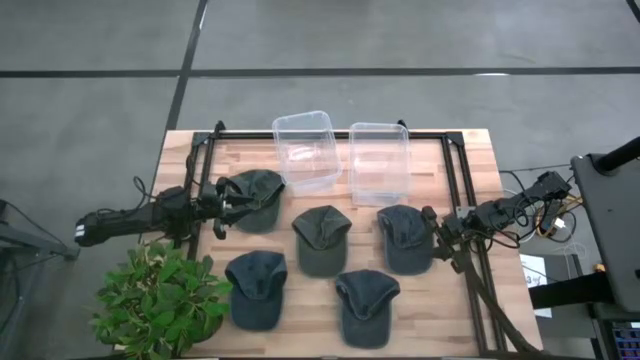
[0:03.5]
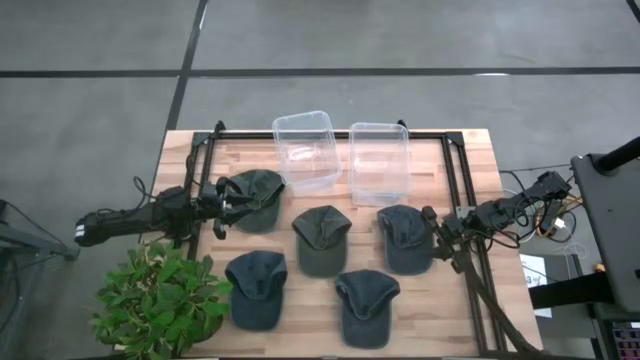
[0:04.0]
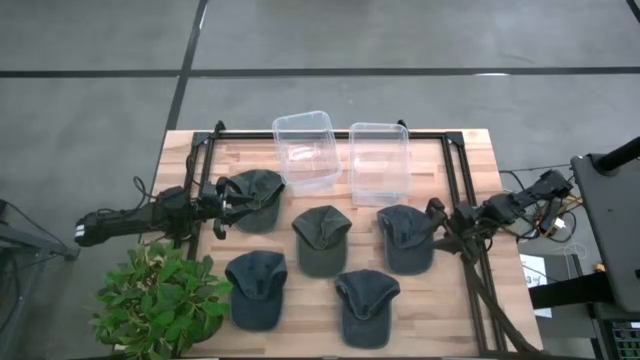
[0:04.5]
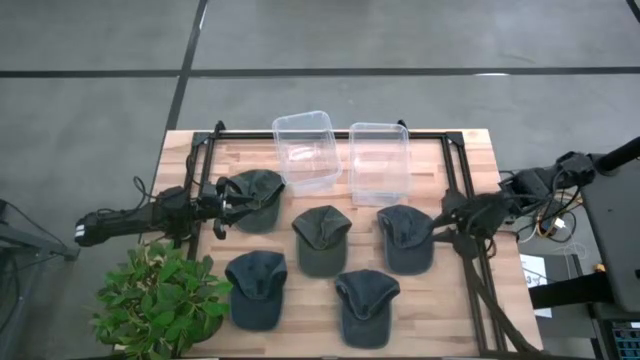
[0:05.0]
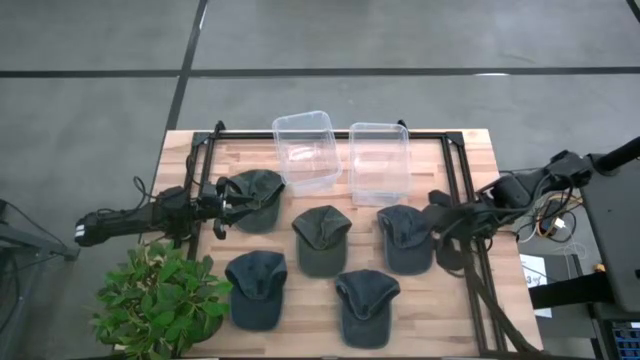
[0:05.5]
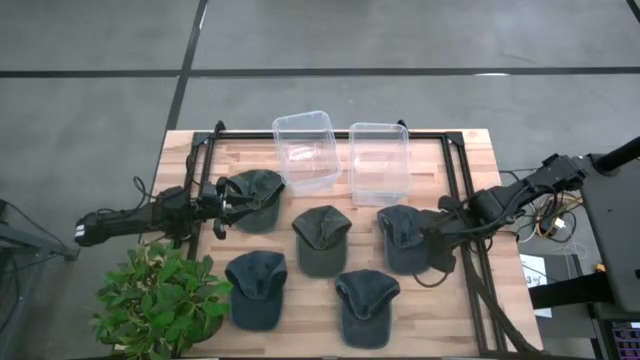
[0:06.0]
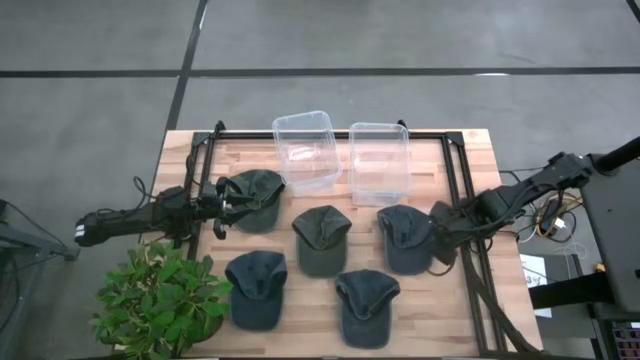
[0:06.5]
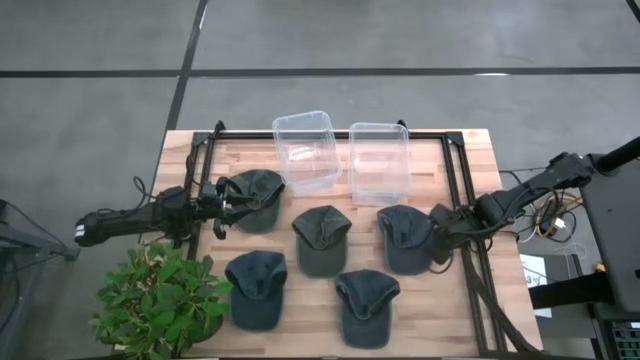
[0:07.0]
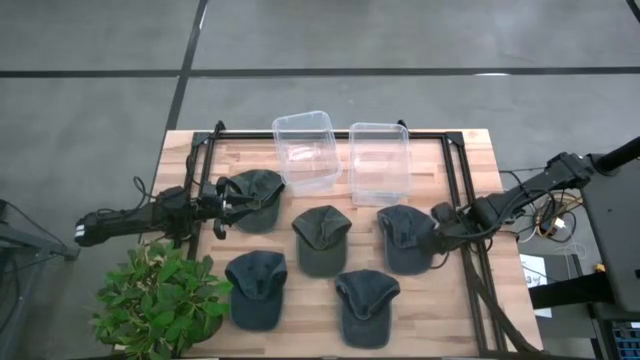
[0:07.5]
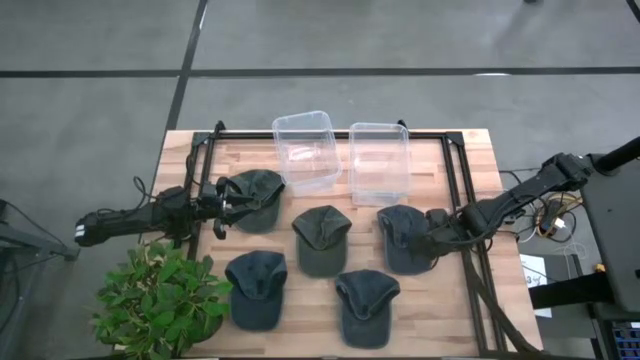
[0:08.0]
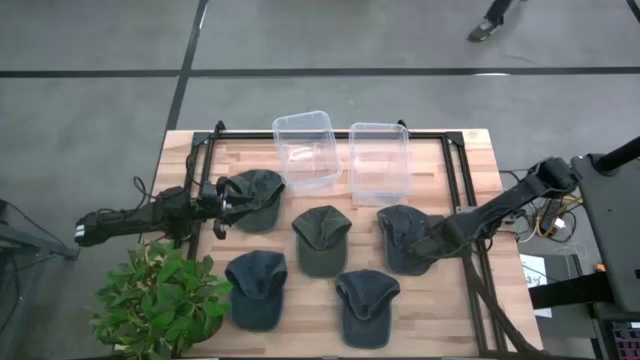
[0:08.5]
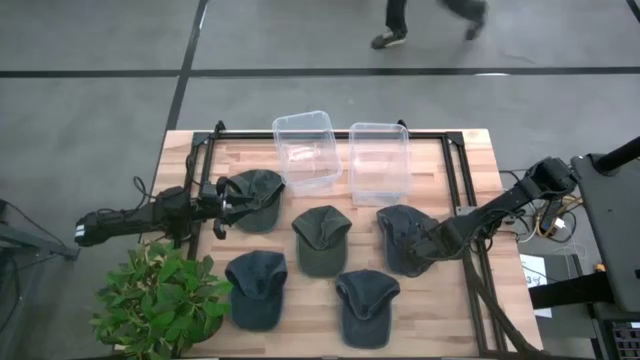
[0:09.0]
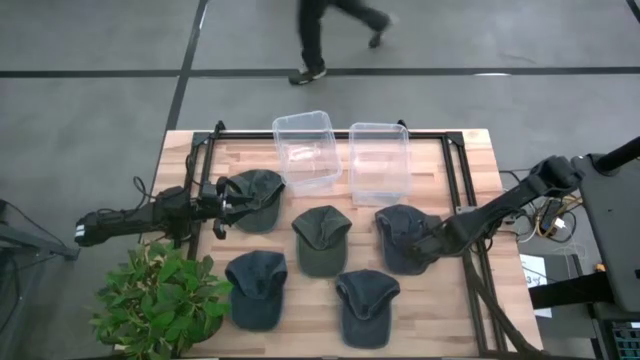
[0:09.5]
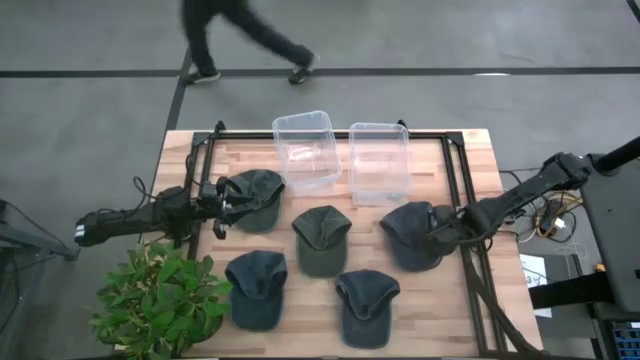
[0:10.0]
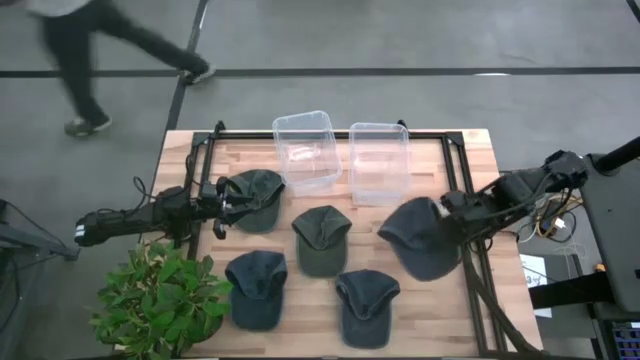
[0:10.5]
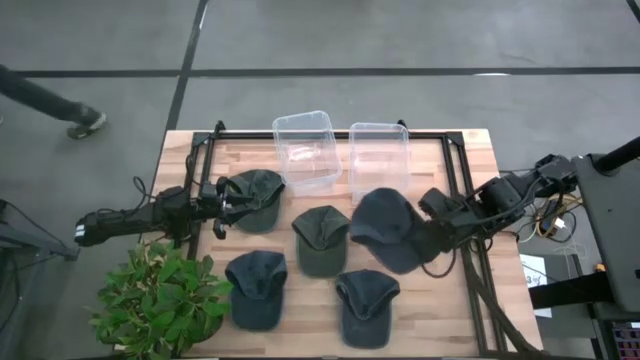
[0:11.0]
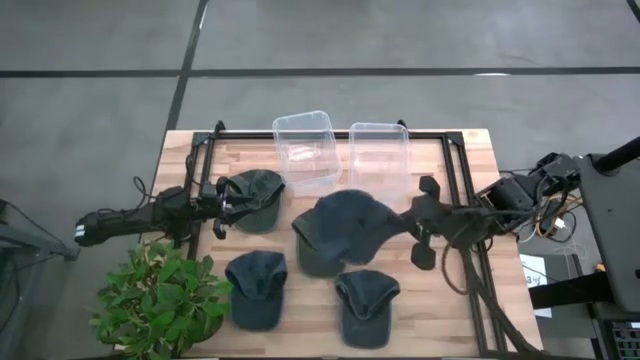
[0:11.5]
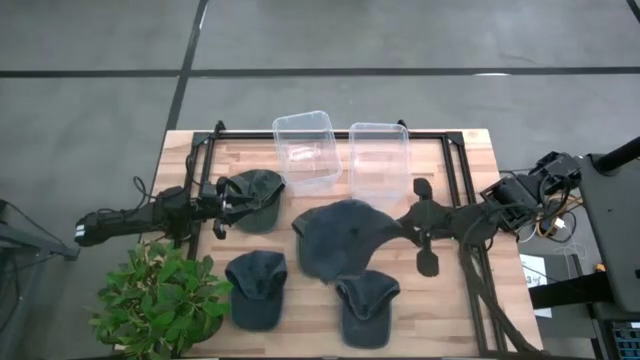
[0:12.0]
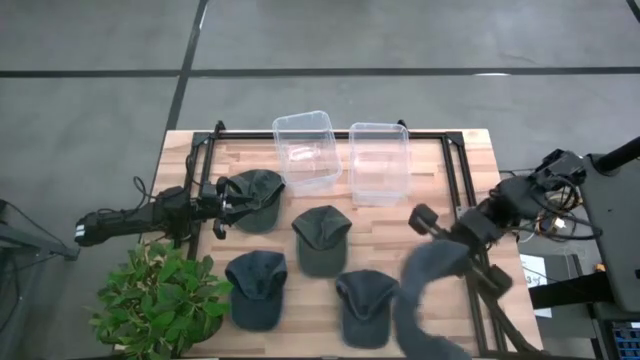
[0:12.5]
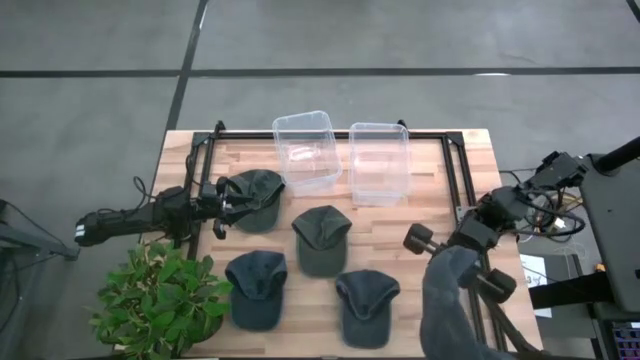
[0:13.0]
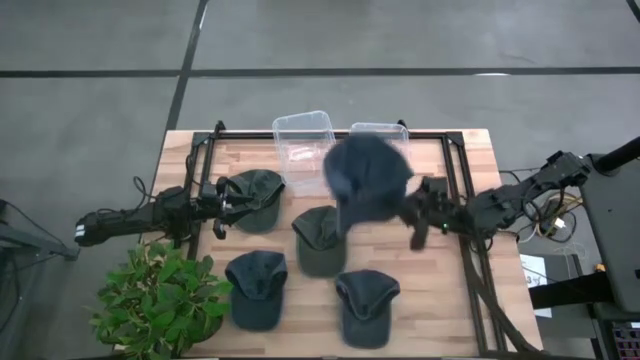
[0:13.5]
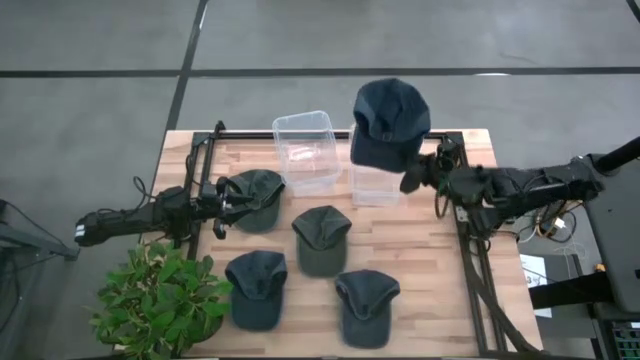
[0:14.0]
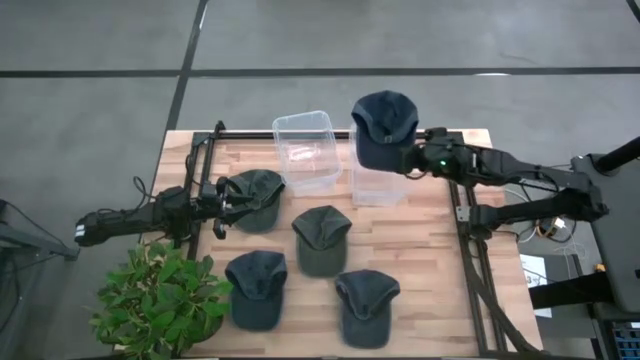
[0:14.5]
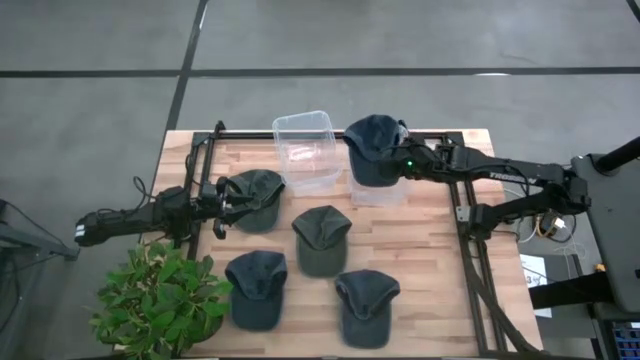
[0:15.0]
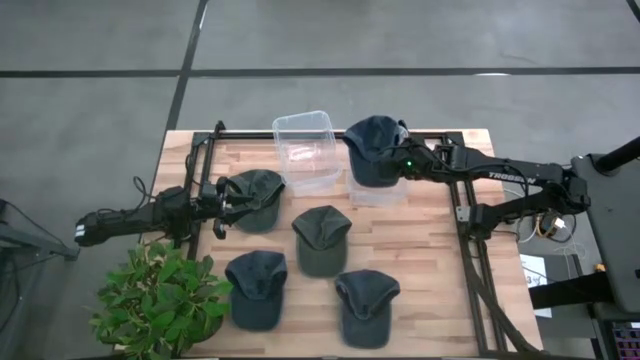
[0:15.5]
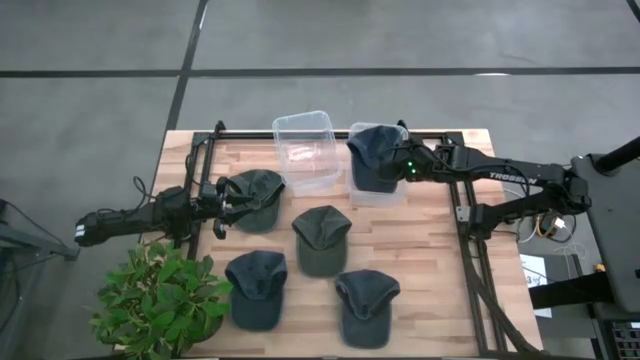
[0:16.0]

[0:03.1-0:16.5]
Task: Pick & Place hat
Put the top dark blue cap into the right transparent bin

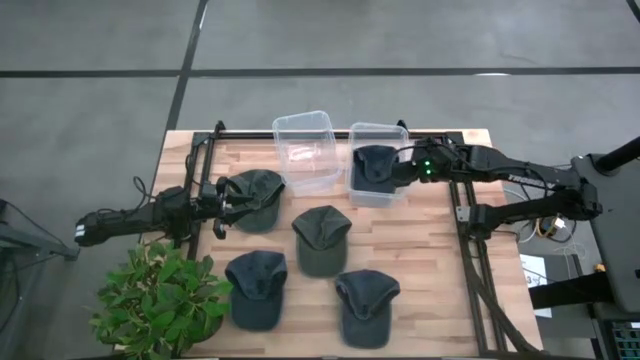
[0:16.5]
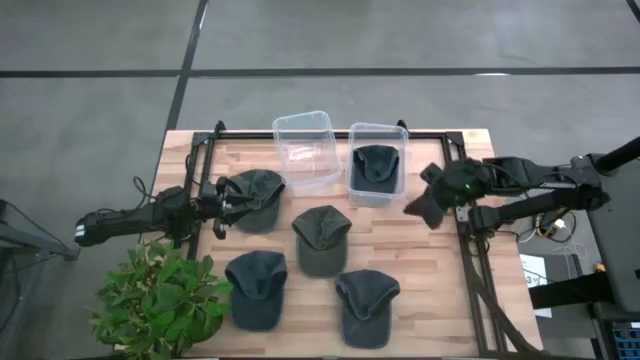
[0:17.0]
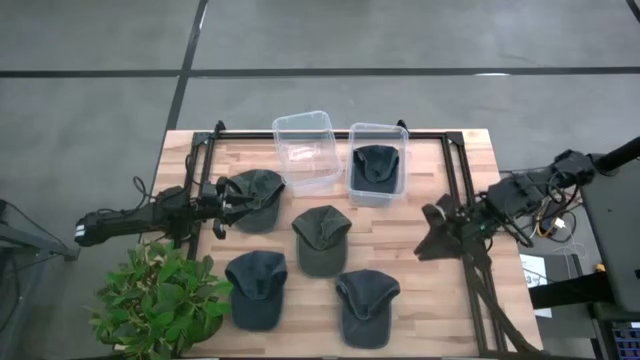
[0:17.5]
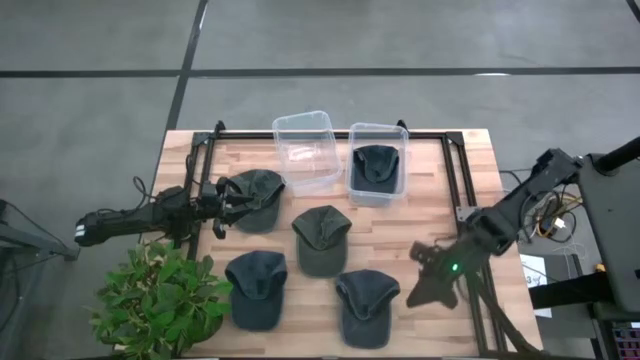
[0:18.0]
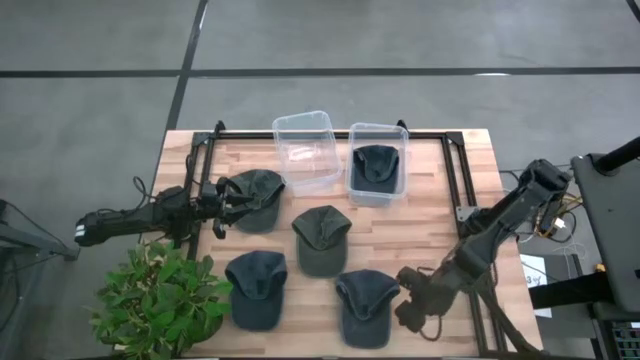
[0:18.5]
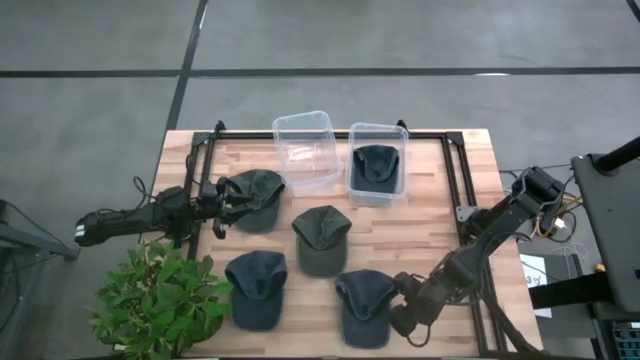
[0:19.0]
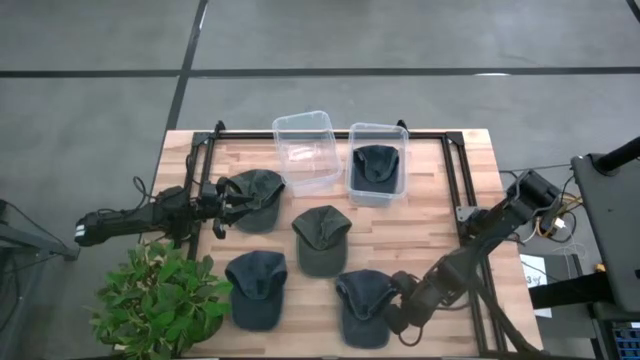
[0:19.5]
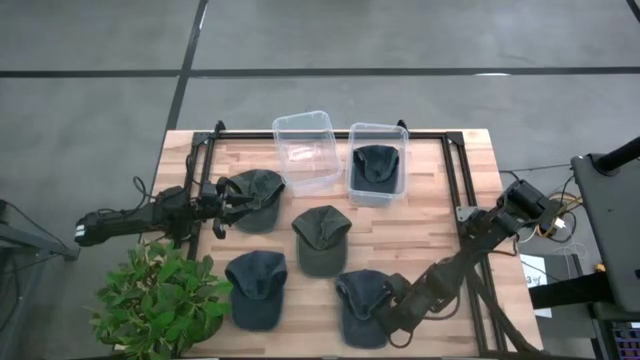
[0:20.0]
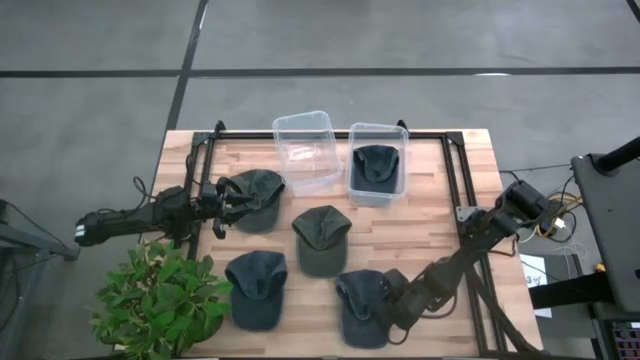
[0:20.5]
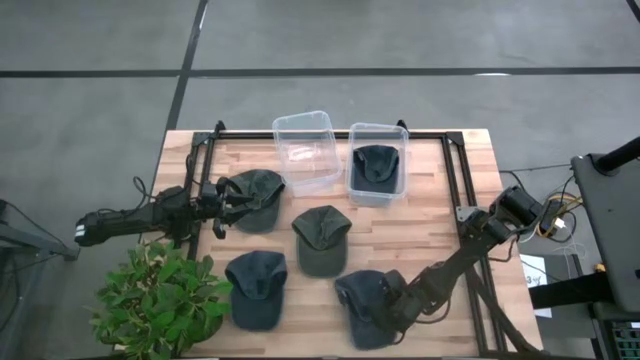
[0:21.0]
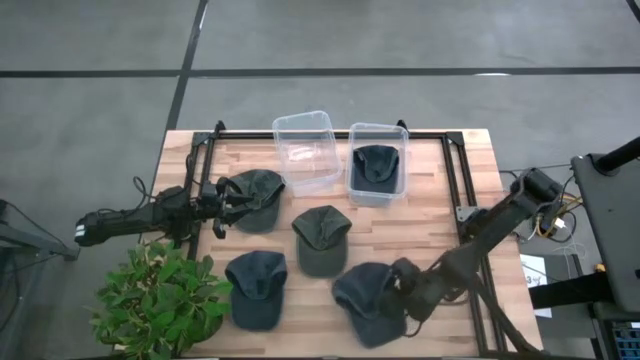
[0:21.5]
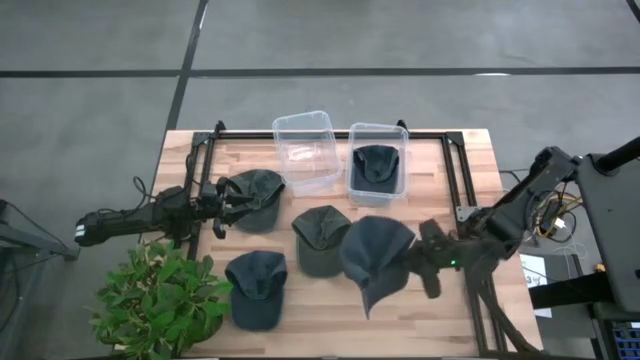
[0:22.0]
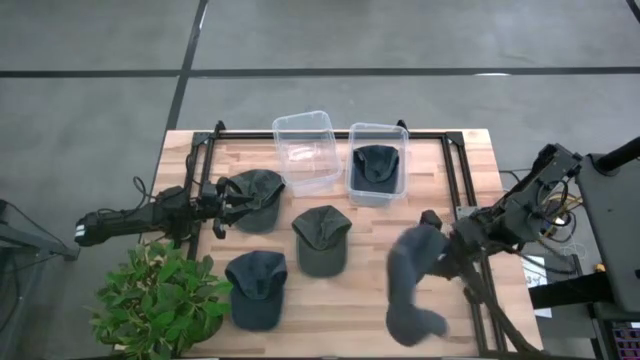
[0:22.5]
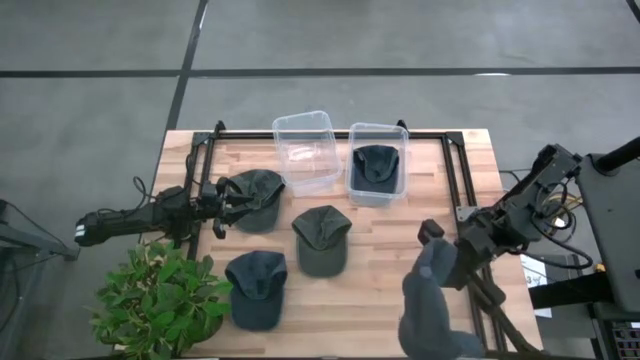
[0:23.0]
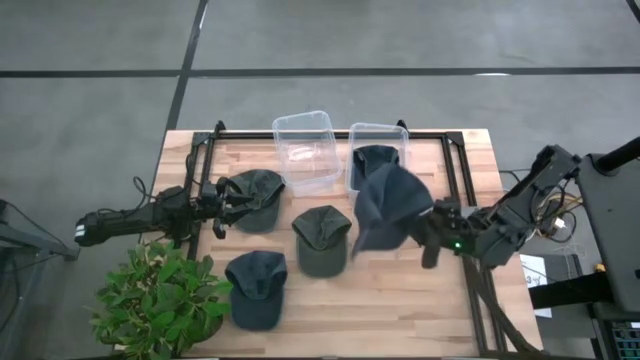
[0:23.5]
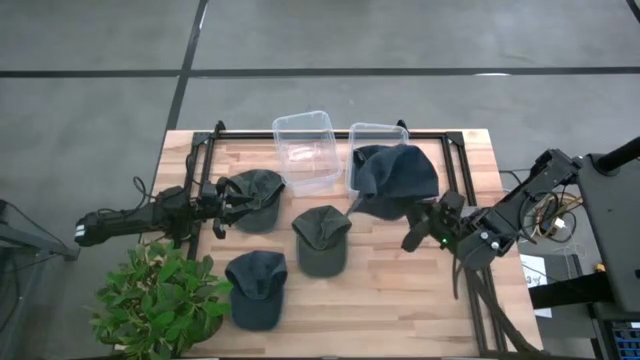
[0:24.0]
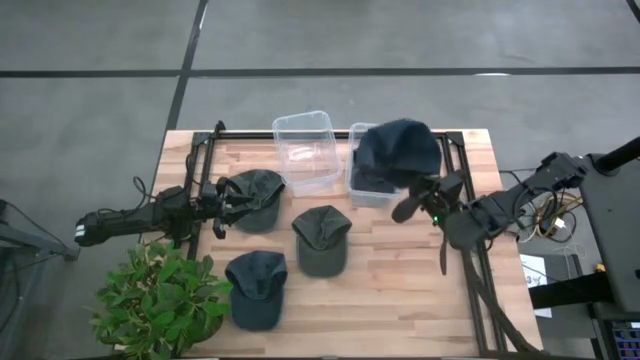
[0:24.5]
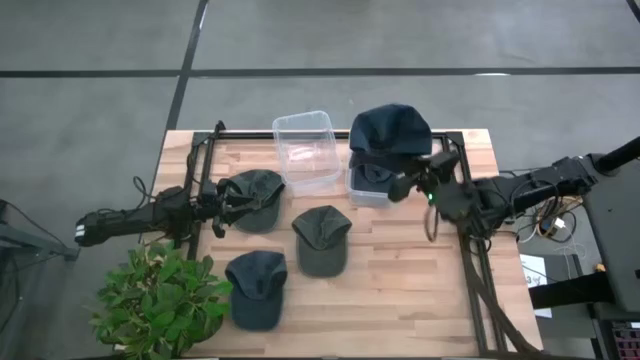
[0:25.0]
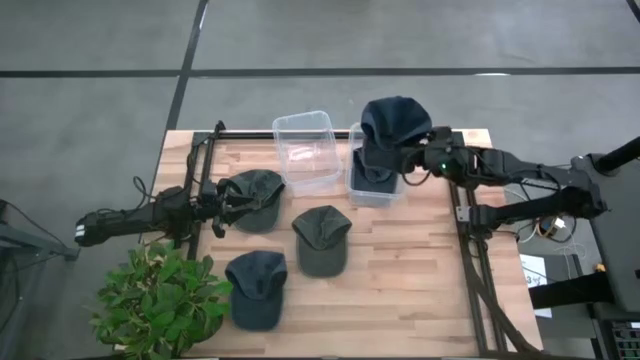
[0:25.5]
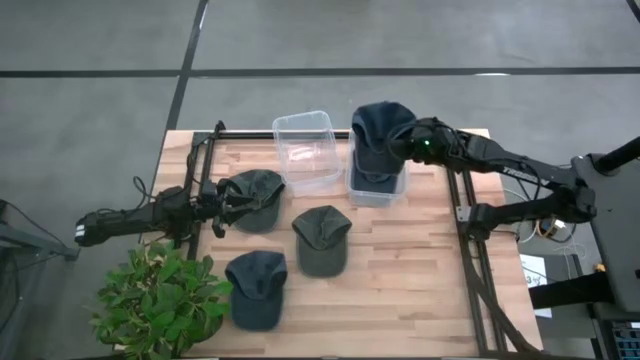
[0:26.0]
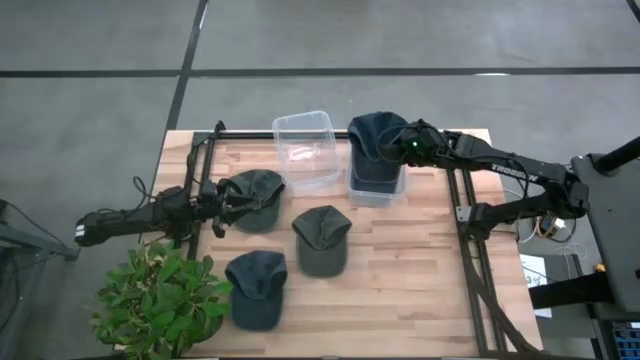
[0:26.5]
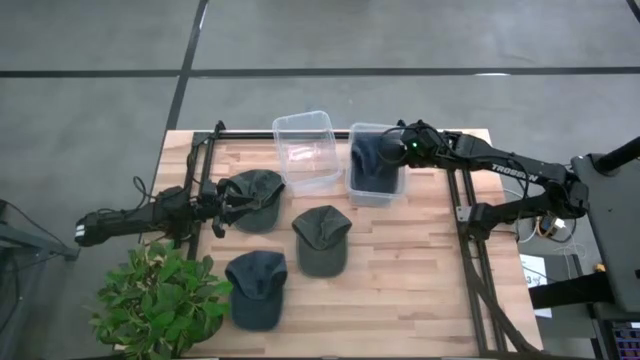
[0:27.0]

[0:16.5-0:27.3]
Put the right dark blue cap into the right transparent bin
